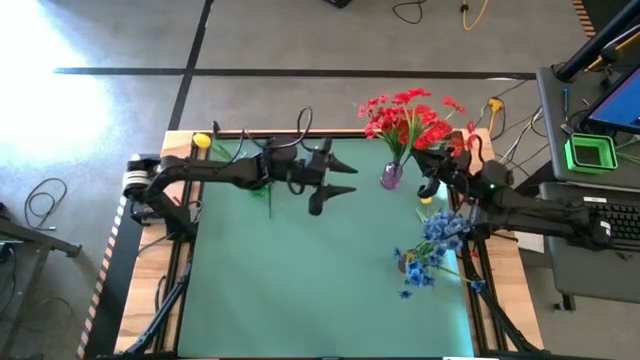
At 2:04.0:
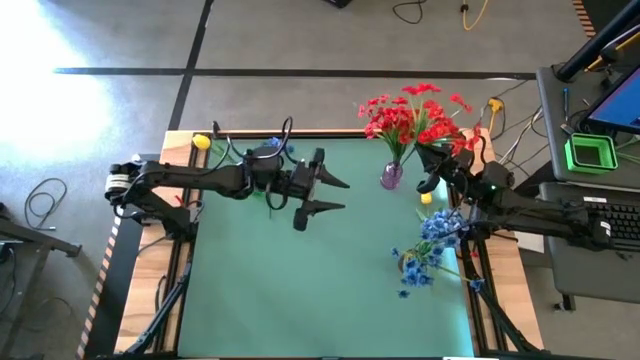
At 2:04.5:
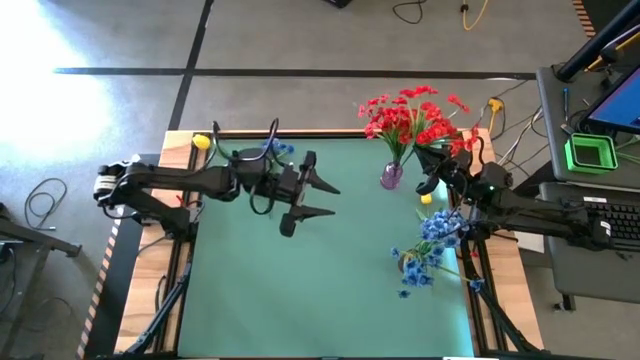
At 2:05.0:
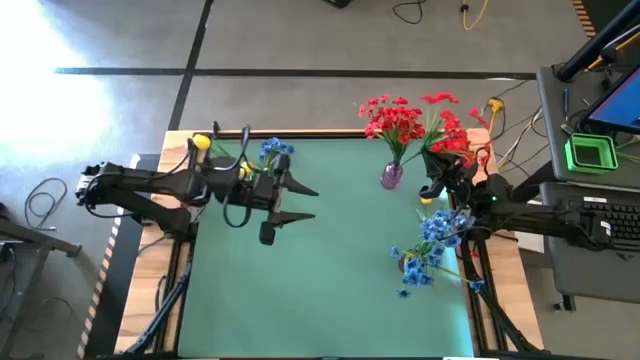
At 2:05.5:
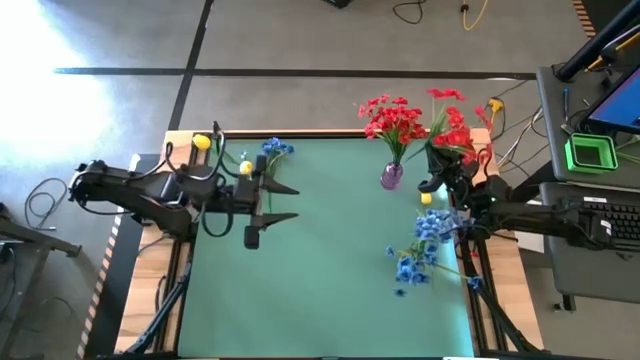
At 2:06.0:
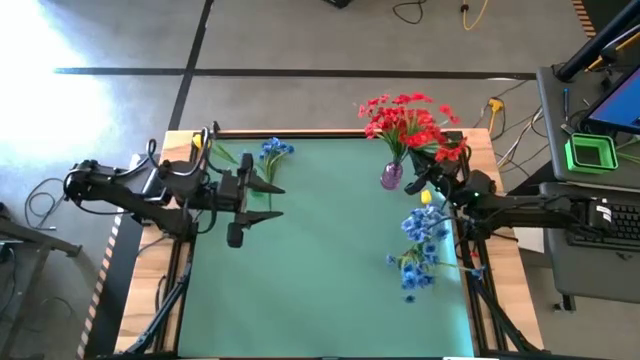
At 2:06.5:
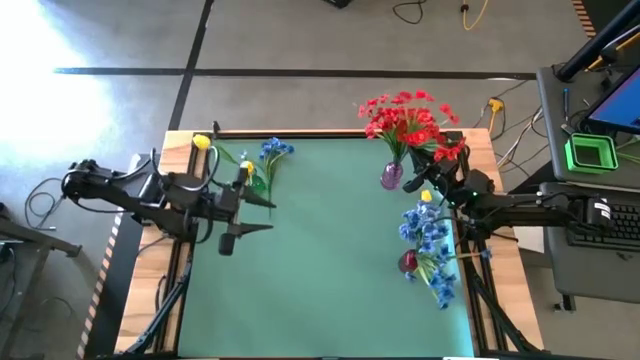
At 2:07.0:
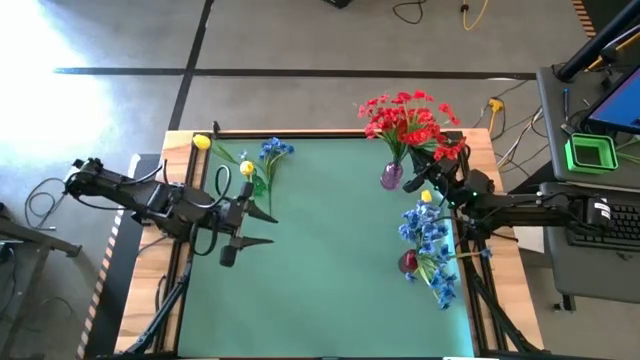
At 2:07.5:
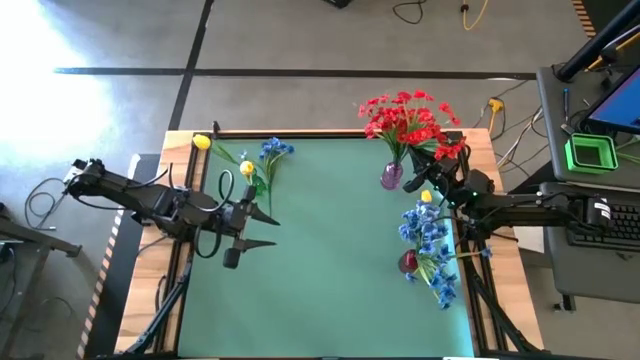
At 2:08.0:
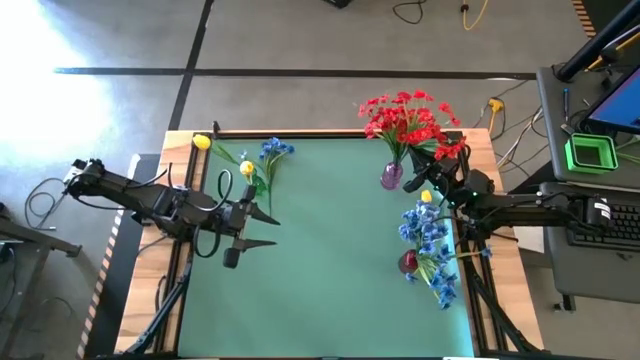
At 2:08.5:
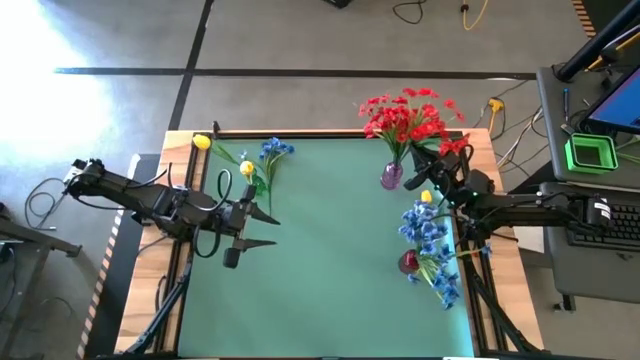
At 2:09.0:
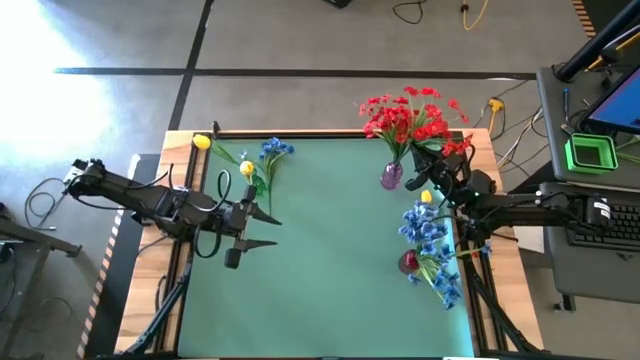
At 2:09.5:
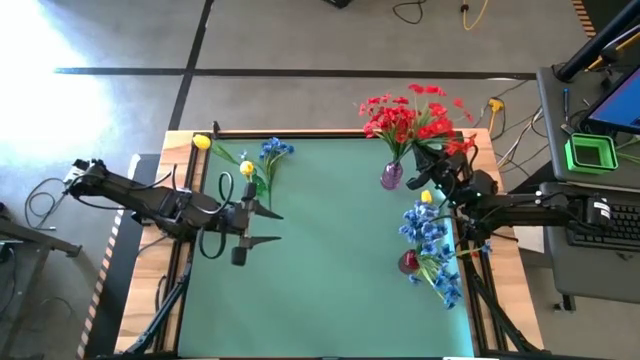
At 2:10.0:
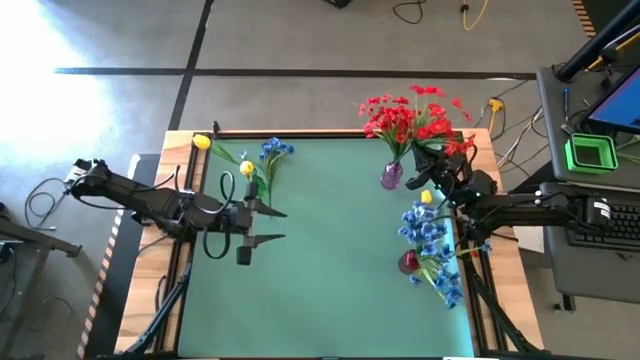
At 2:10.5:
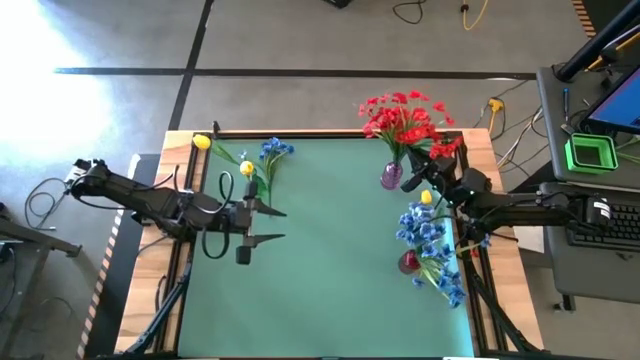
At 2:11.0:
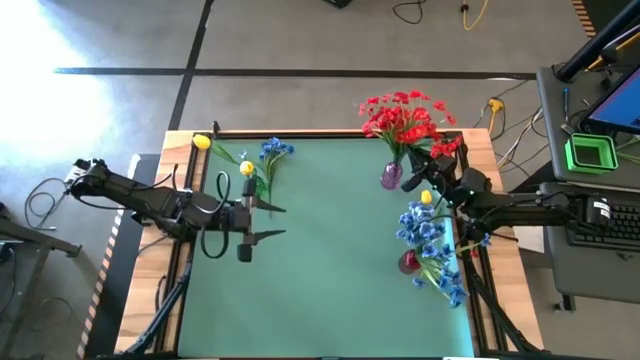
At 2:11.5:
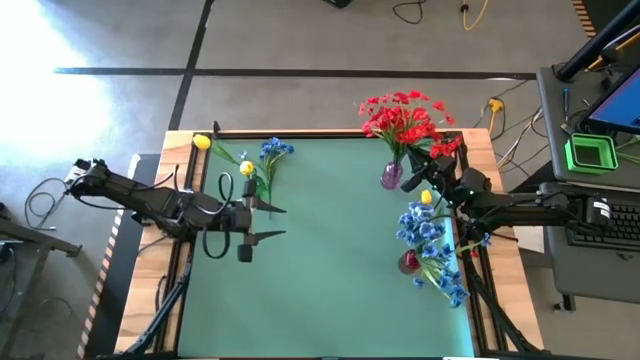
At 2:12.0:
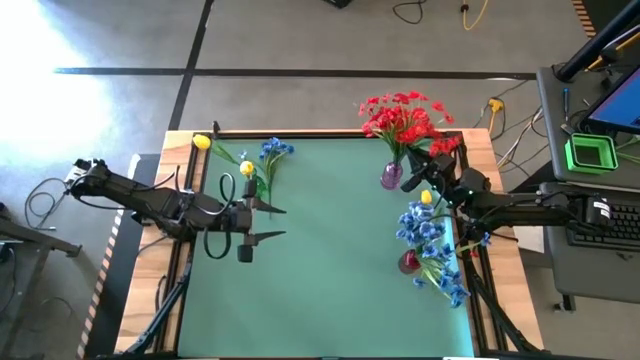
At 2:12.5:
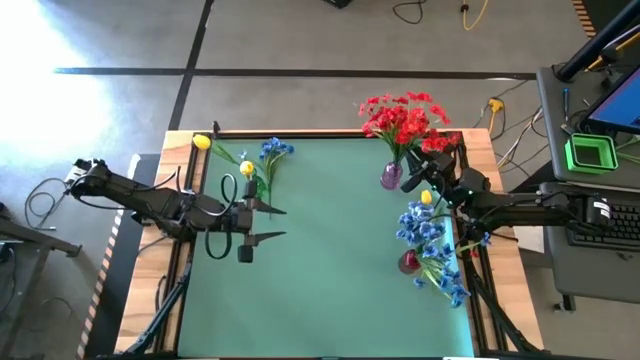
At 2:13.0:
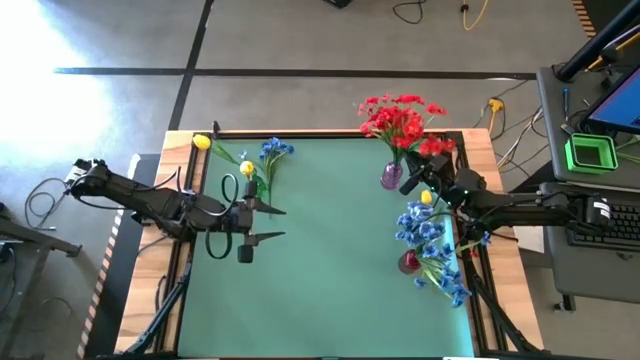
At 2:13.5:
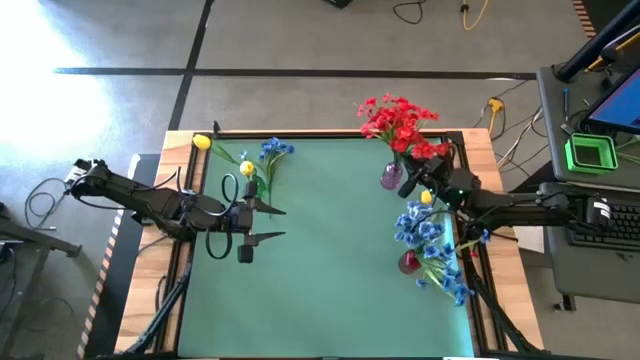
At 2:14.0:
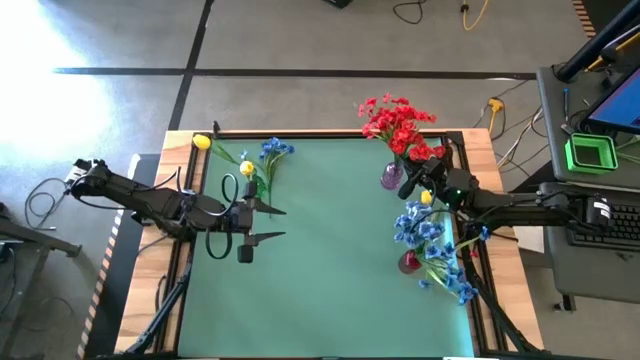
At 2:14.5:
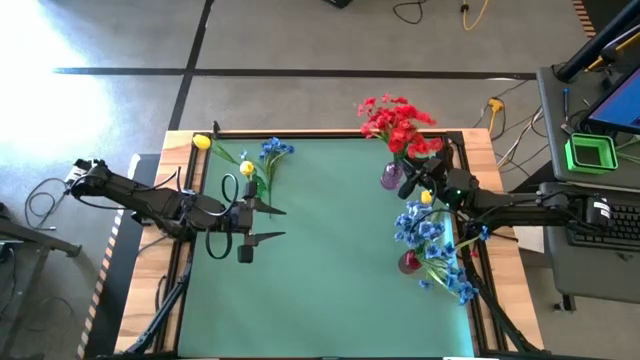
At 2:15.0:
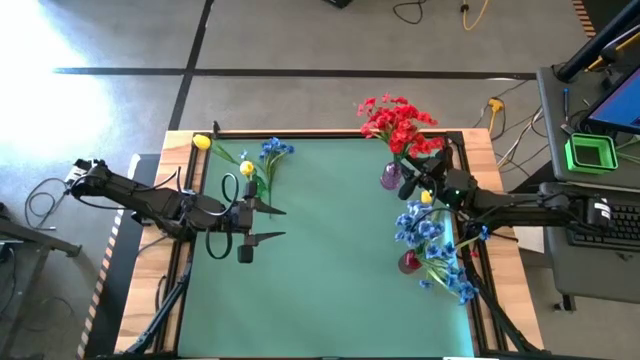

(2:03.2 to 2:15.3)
Task: Sort flowers into vase by color
Put the red flower into the purple vase

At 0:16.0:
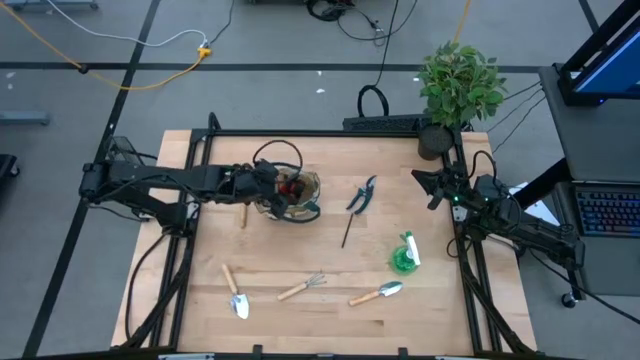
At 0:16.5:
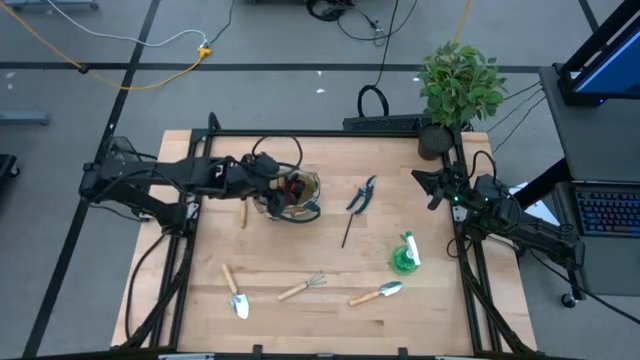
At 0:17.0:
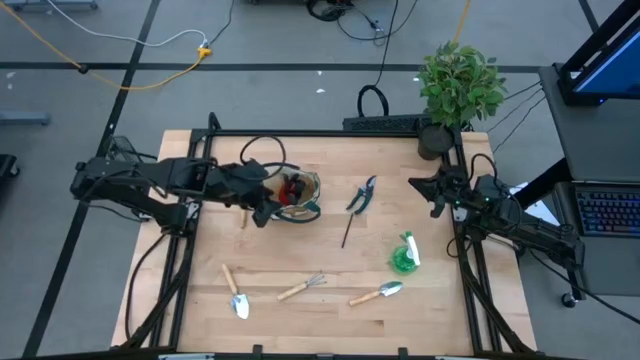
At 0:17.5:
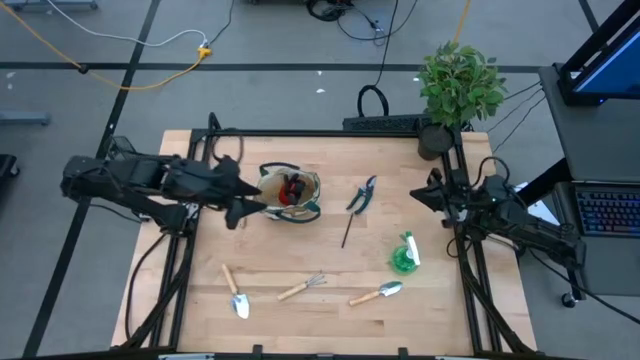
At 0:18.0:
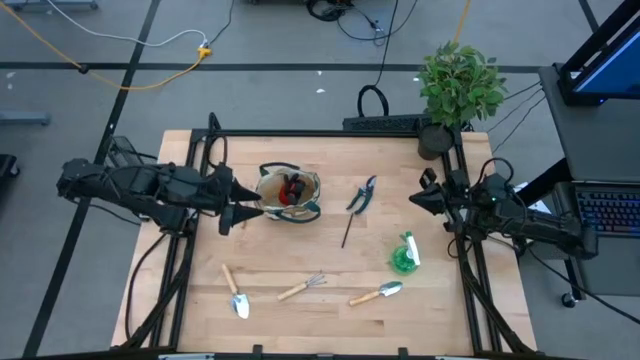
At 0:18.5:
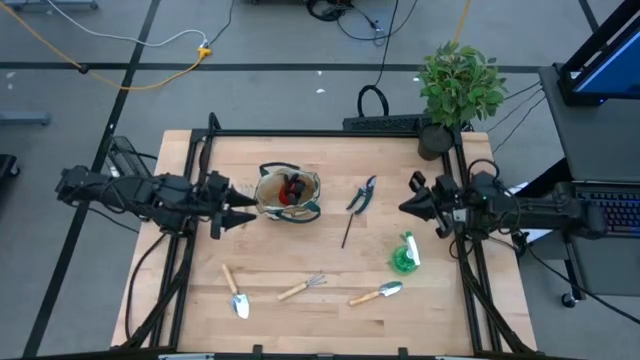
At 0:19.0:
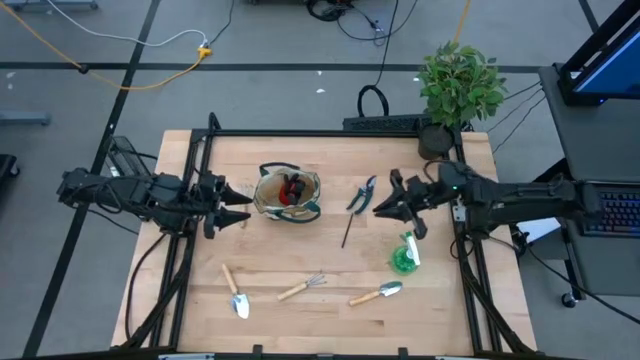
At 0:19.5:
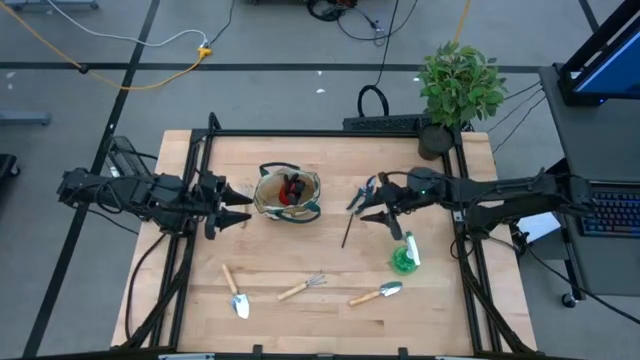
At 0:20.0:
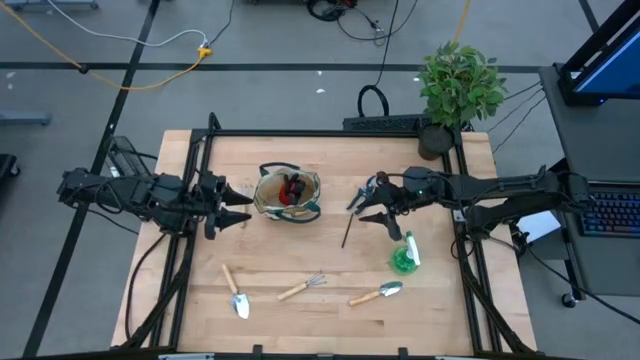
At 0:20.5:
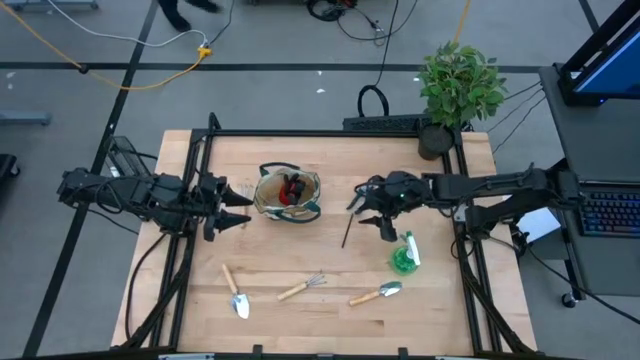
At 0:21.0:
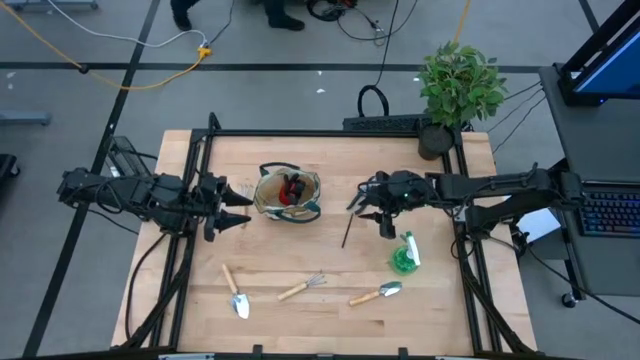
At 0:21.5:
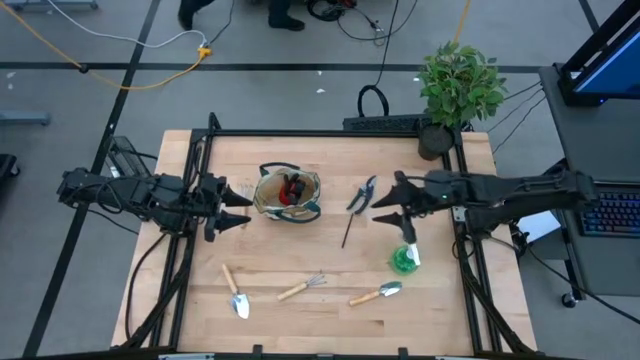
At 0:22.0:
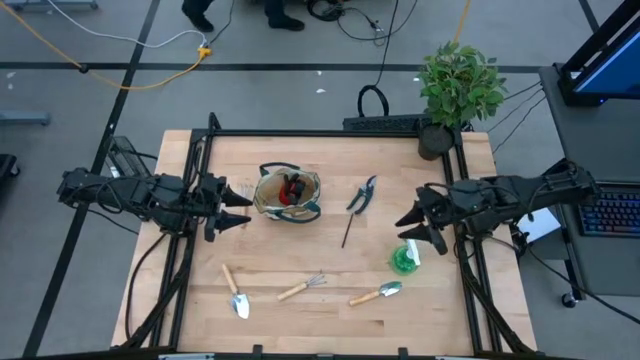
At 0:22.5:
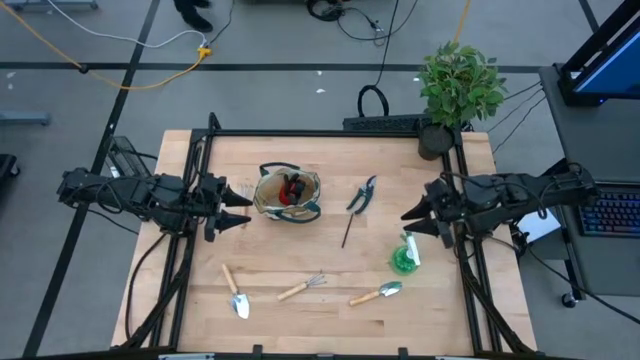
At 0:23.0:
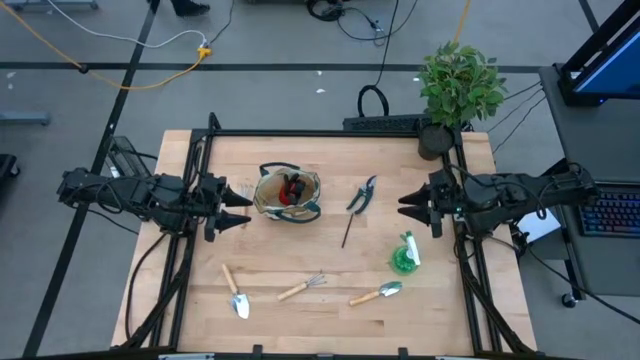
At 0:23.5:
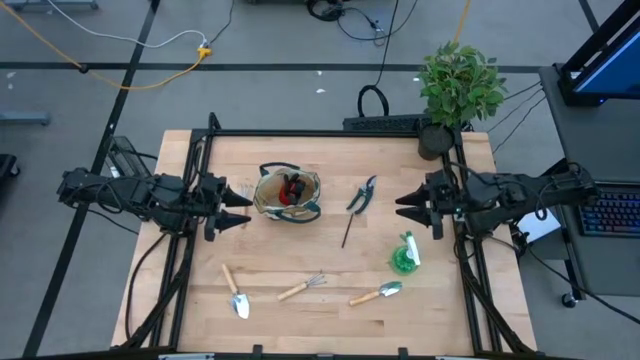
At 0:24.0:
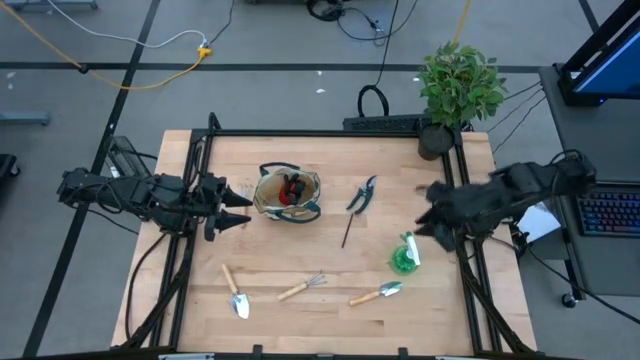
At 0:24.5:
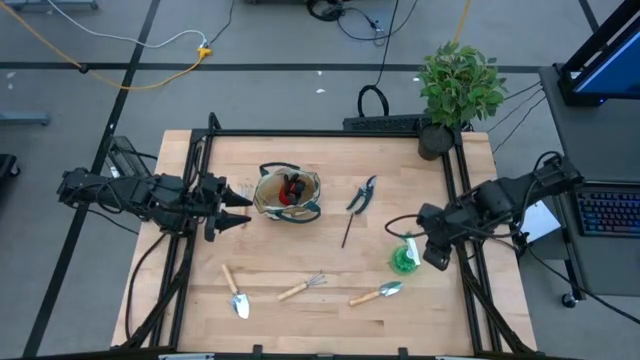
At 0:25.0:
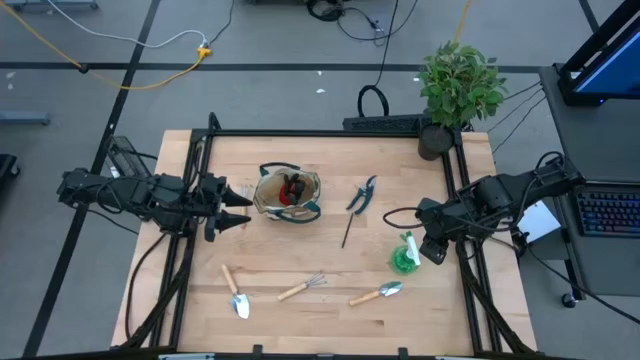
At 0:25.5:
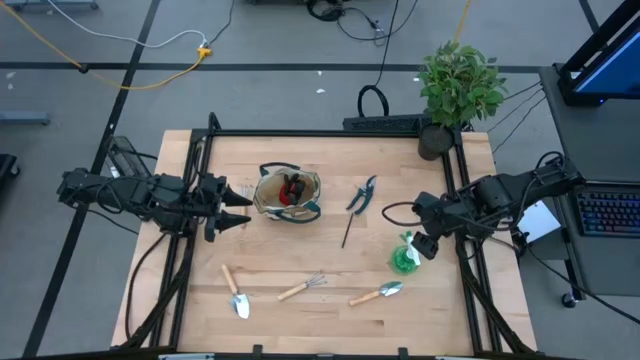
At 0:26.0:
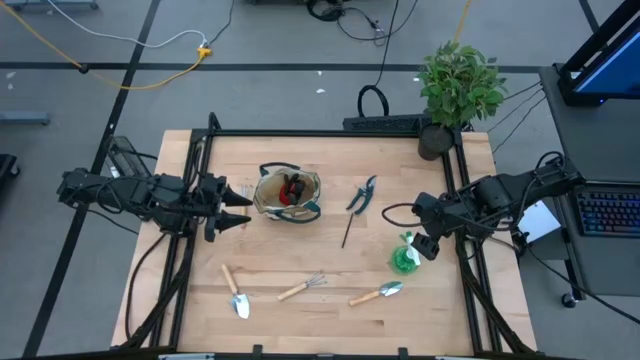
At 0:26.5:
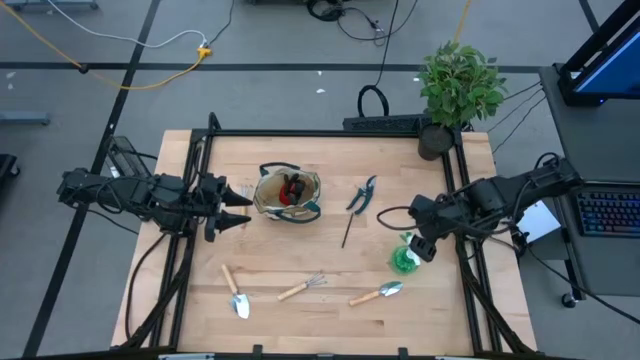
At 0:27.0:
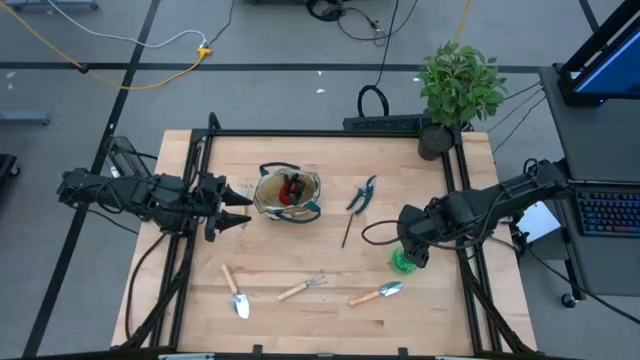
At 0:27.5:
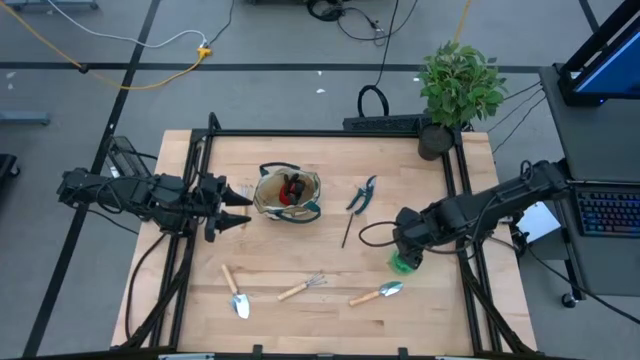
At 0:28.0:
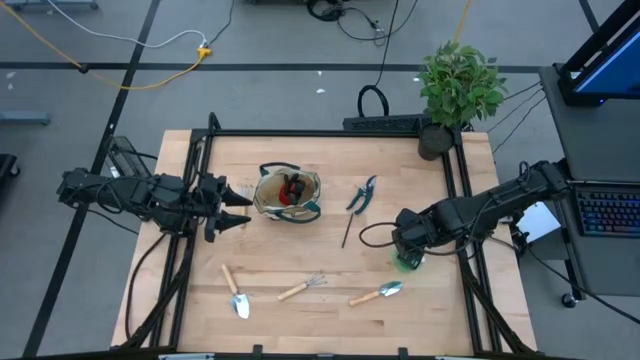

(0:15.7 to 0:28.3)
Task: Pick & Place Garden tools in Gardening bag
Put the green spray bottle into the gardening bag
